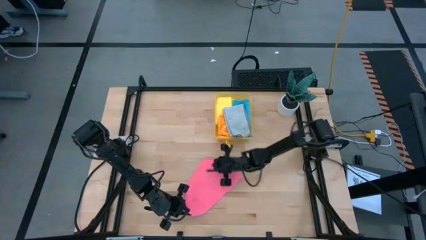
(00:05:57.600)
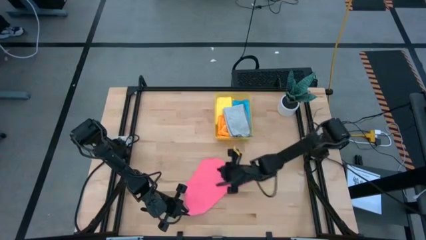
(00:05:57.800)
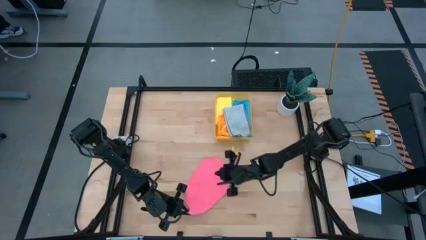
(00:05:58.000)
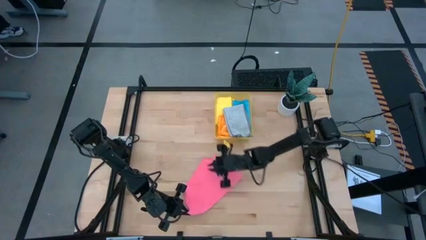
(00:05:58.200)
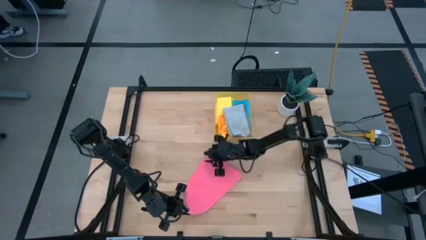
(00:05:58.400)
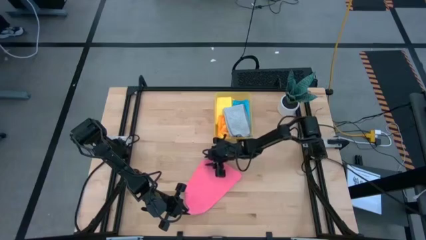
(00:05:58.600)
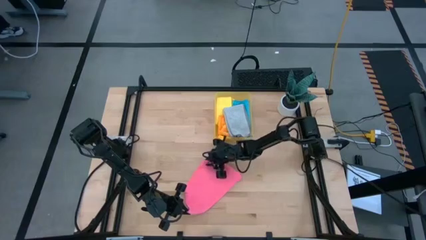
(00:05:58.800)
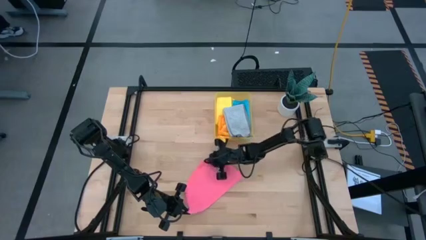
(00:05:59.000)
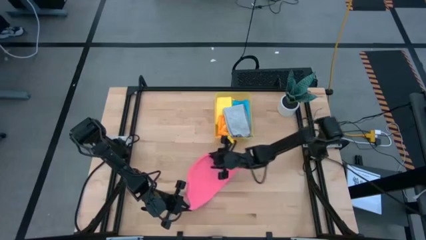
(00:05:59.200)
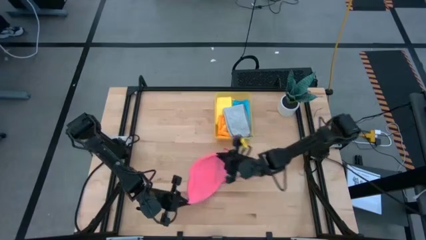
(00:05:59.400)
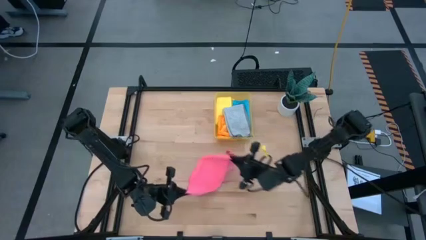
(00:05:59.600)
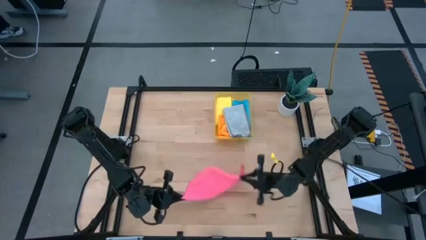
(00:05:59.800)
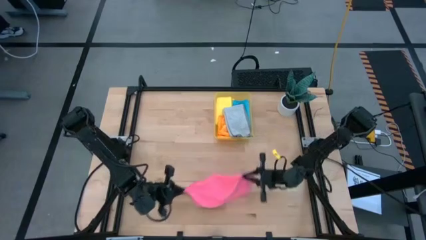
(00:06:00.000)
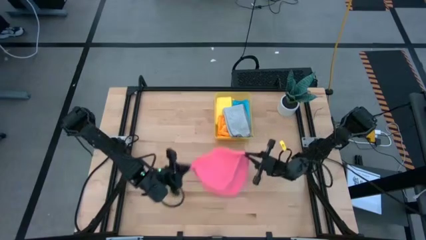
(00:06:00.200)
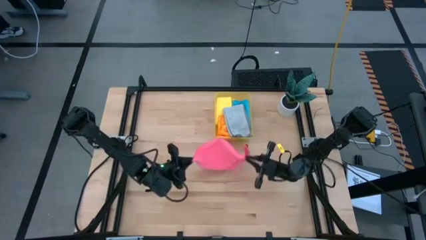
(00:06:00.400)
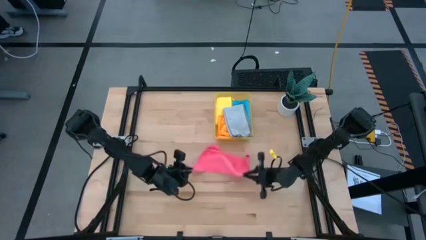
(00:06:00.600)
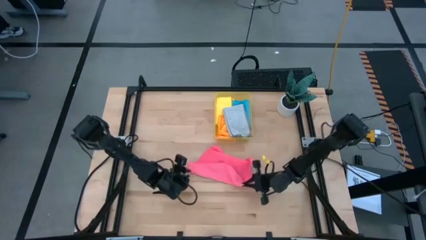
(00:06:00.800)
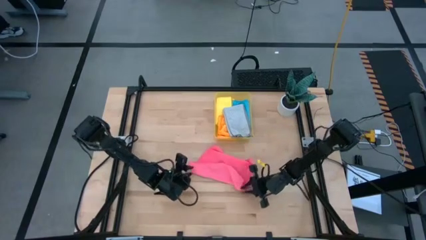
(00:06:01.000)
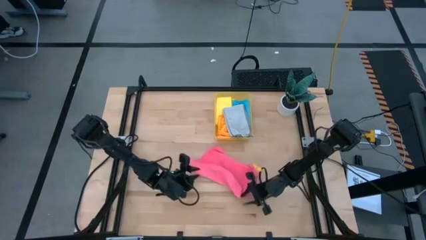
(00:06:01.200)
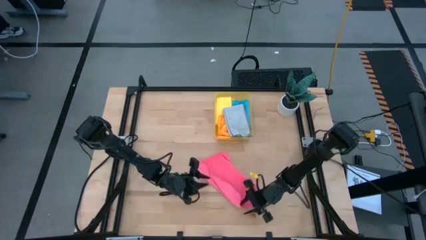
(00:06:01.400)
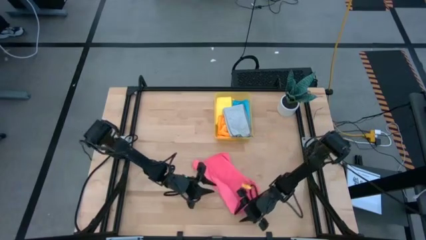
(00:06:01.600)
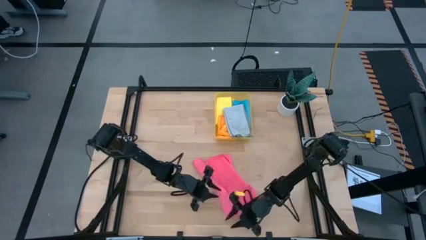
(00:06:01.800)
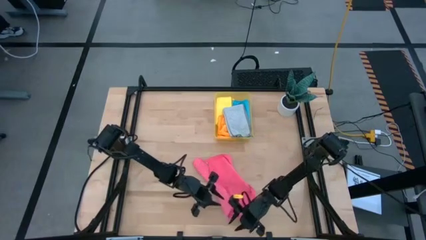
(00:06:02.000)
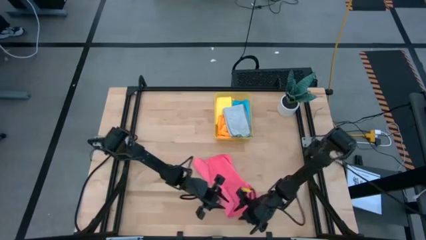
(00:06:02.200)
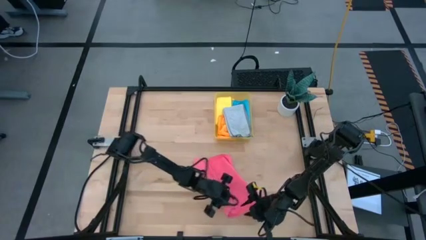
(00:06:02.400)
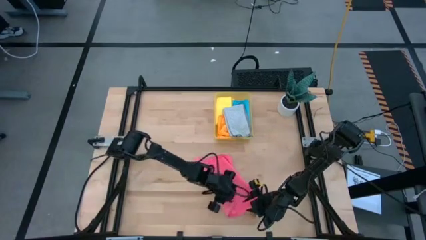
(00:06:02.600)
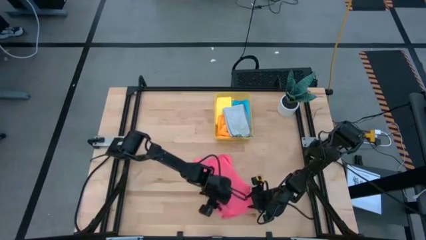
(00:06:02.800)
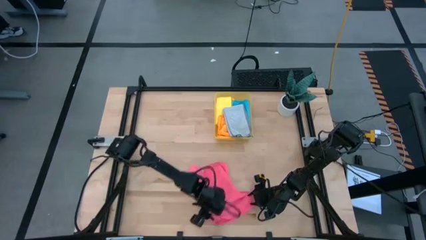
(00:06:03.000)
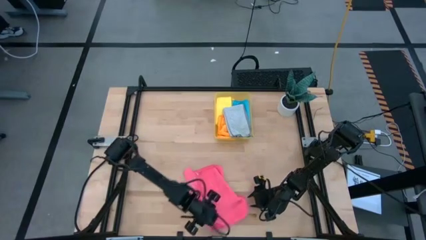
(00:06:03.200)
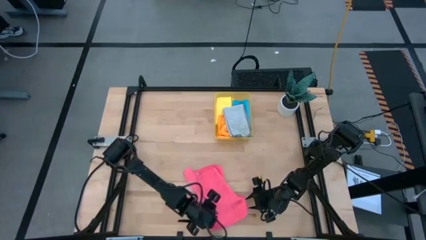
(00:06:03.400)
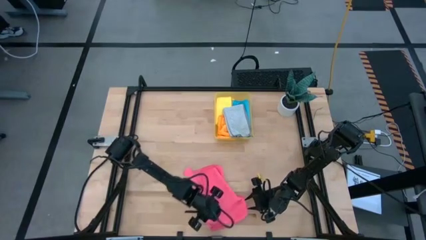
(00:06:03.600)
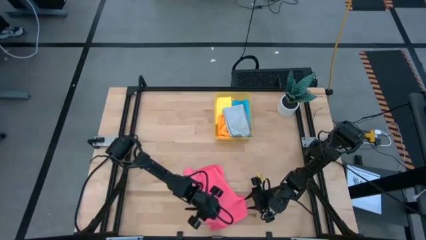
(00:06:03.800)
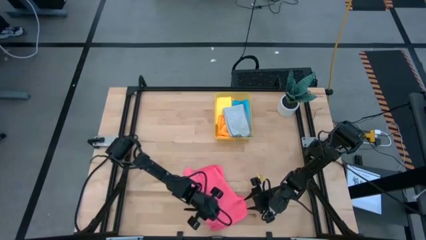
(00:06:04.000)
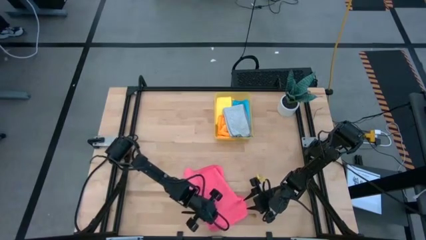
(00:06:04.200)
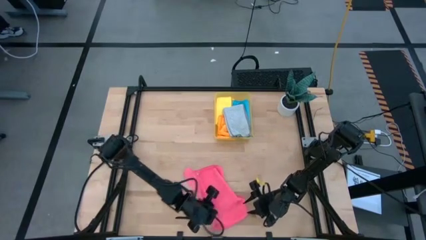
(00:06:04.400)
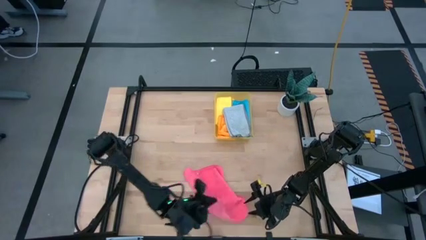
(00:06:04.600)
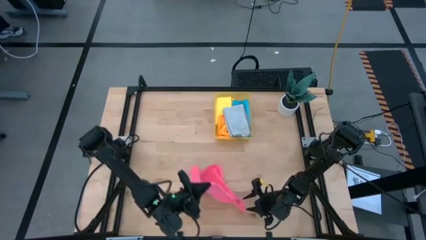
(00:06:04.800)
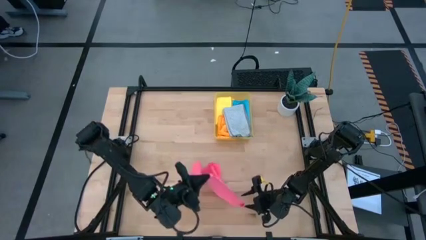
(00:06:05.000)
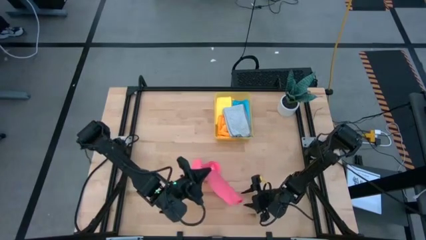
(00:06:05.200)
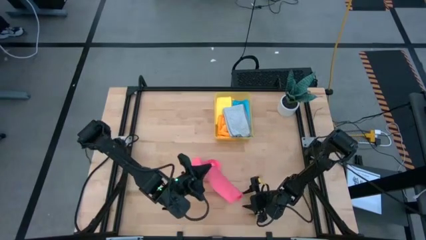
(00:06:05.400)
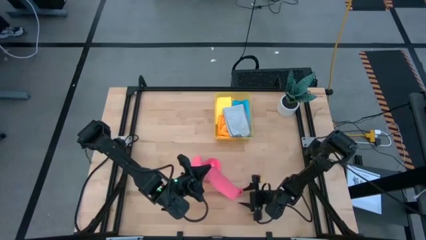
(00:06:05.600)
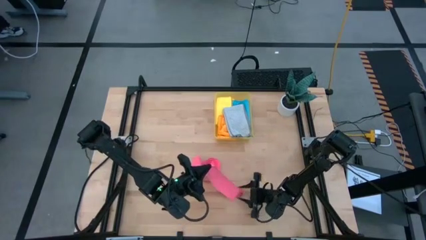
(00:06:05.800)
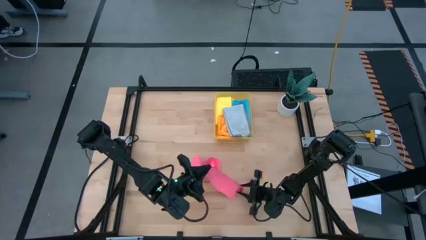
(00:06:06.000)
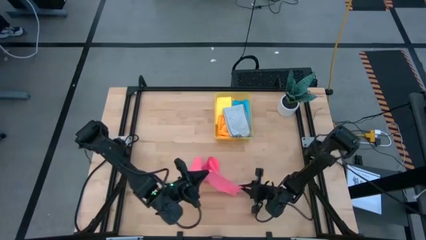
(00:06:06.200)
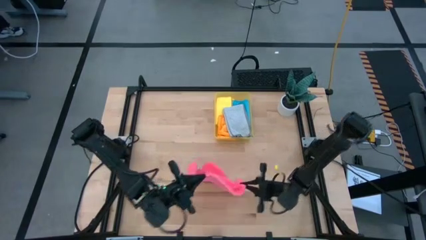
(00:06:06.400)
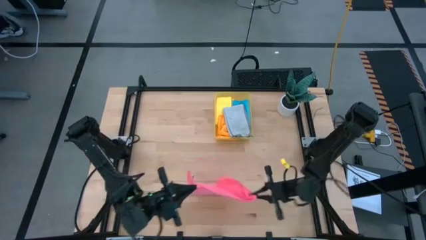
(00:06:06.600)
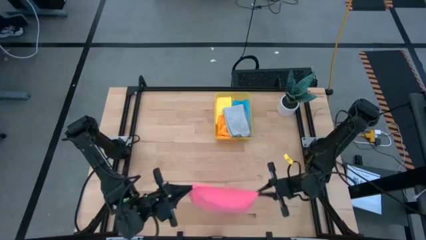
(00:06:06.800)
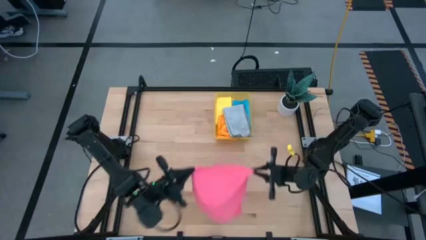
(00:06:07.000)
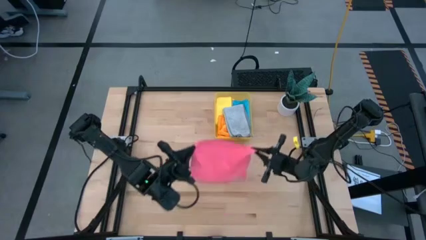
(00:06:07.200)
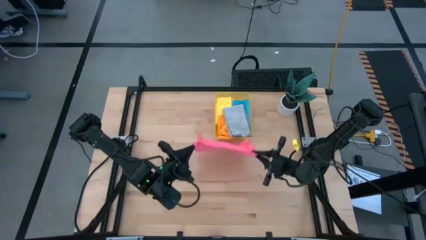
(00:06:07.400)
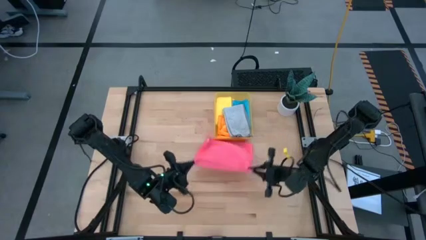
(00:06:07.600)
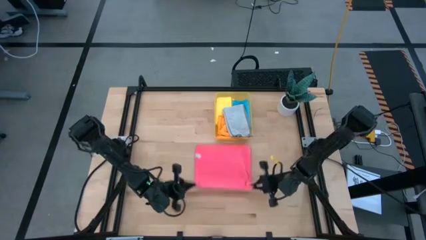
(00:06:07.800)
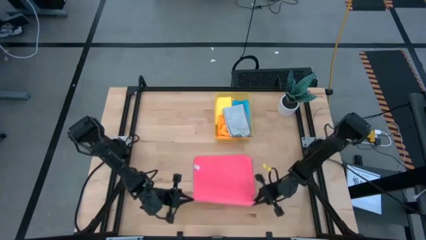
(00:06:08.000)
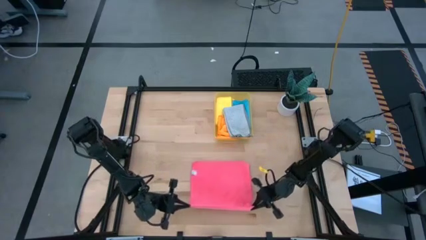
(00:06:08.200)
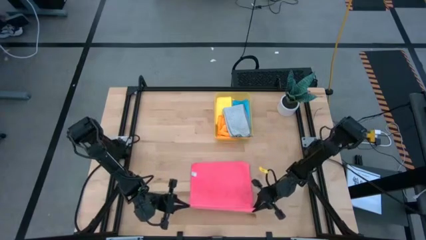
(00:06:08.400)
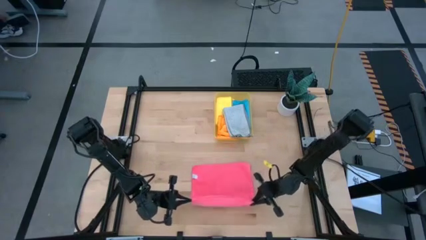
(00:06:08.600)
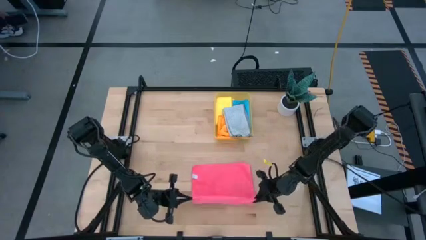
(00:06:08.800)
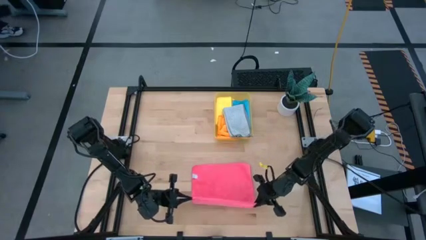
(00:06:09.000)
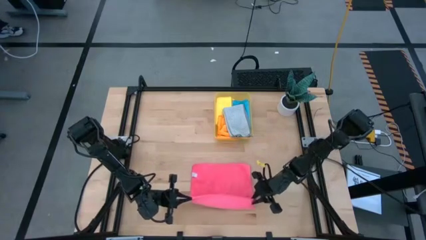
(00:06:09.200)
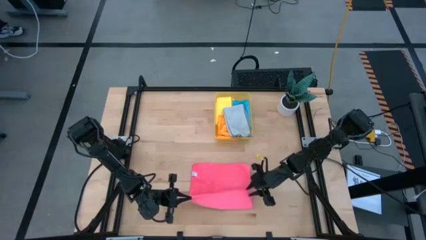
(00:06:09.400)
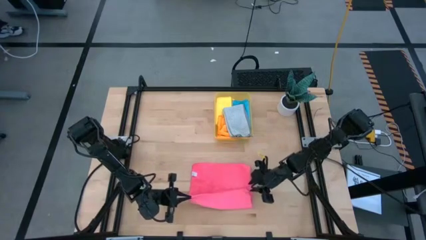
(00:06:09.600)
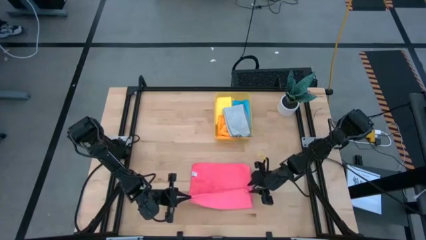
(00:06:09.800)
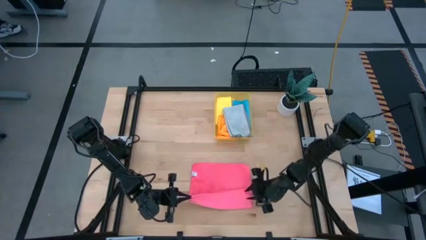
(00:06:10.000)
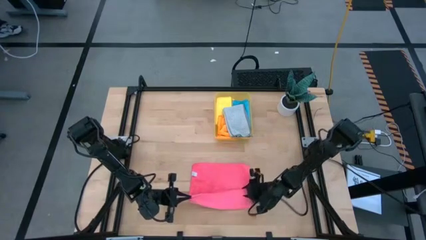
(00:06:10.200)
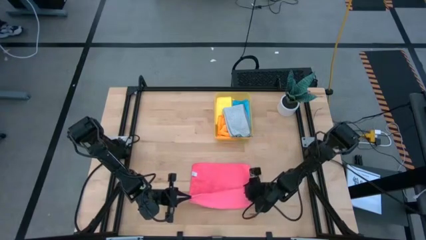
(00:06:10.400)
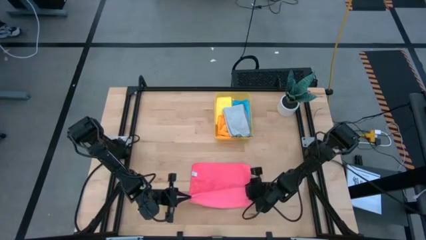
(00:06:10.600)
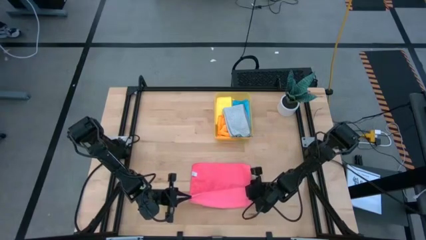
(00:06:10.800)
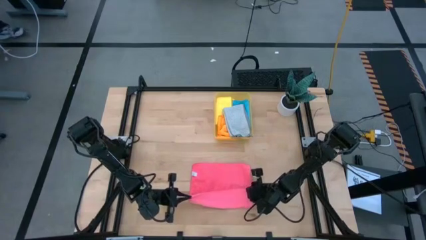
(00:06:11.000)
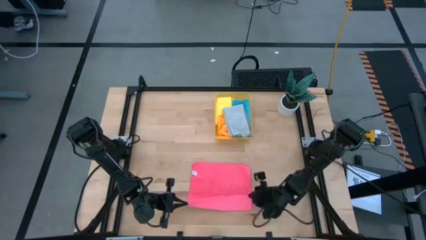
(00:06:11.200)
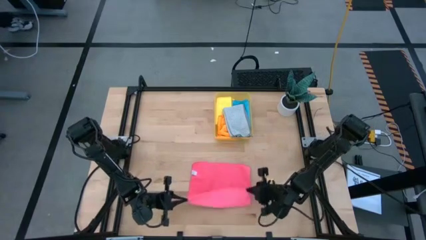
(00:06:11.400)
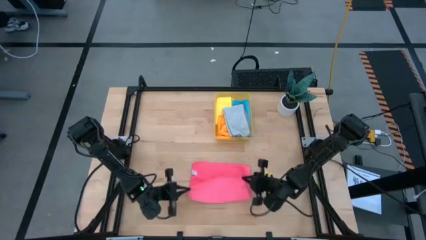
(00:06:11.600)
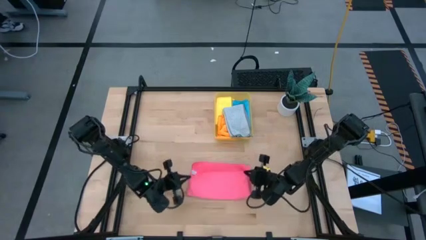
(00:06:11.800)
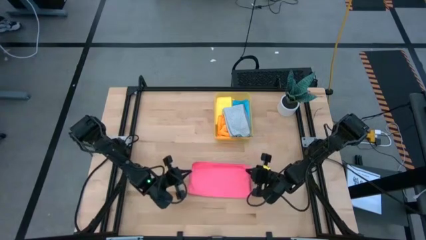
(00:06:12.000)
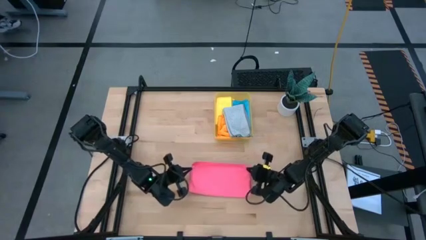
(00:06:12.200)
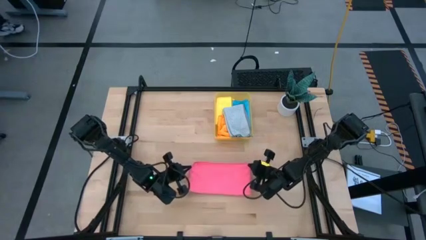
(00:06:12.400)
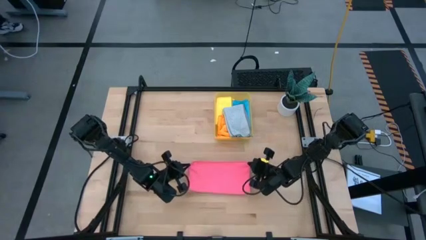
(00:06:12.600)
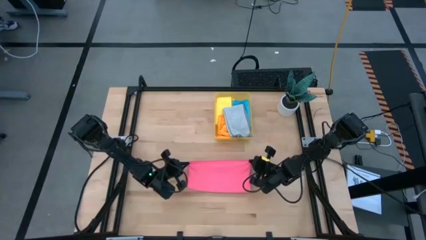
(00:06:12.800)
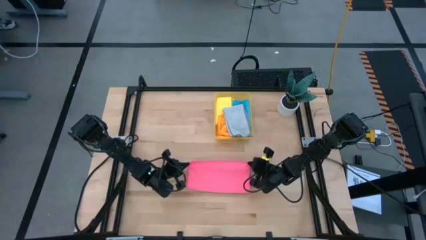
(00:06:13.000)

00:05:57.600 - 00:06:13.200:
Task: Fold microfiber towels
Fold the pink microfiber towel

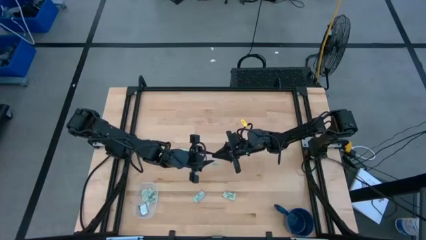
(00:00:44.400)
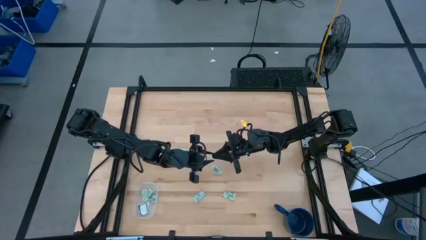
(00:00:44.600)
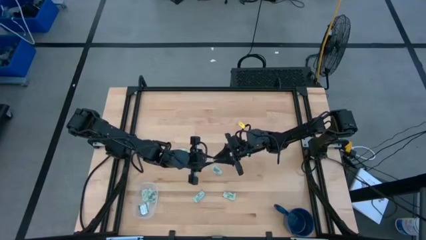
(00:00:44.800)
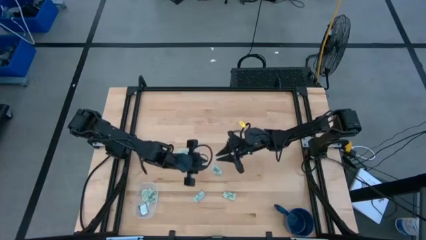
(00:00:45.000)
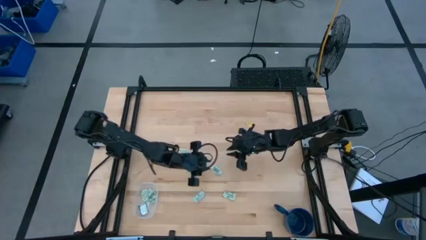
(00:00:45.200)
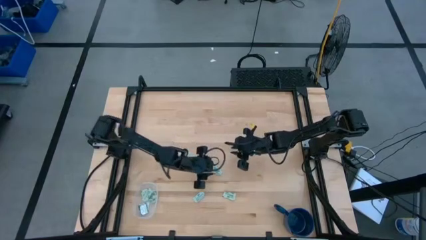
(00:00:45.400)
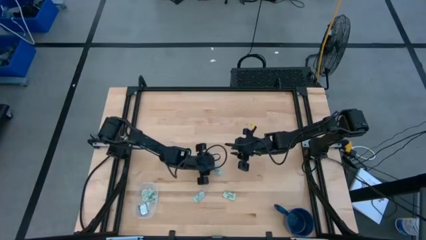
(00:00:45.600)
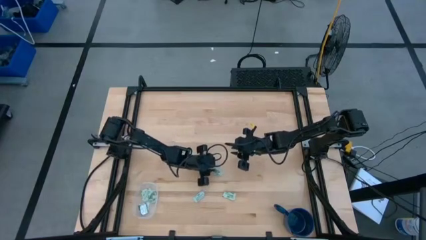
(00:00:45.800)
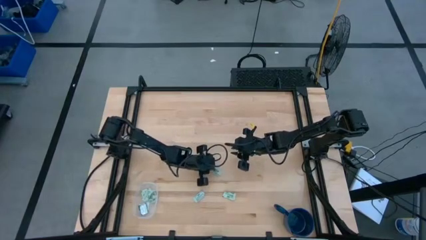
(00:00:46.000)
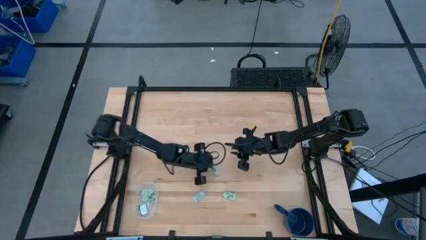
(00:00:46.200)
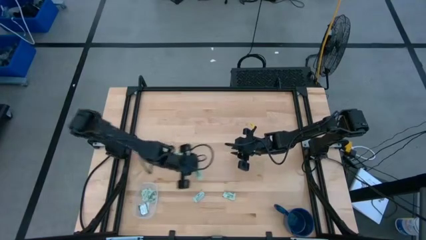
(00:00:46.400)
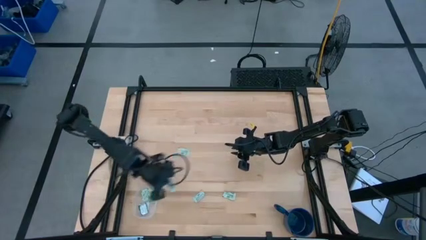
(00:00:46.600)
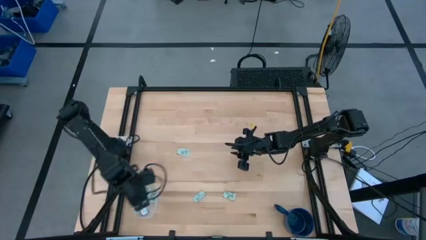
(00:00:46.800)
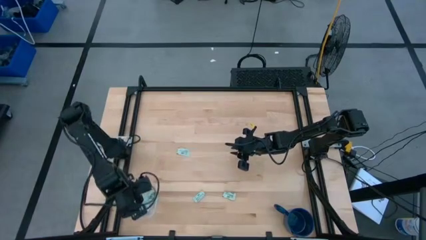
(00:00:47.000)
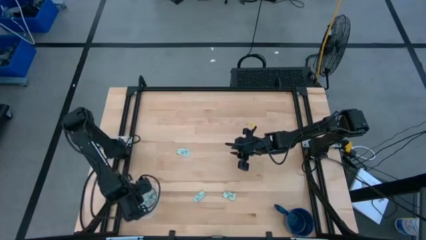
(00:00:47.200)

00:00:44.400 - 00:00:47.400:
Task: Pick and place Stevia / Truvia into bins
Put the stevia packet into the transparent bin
